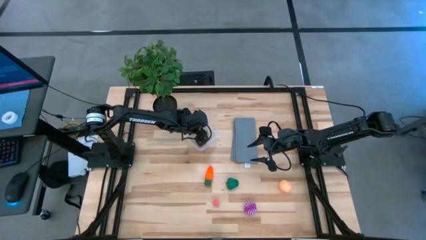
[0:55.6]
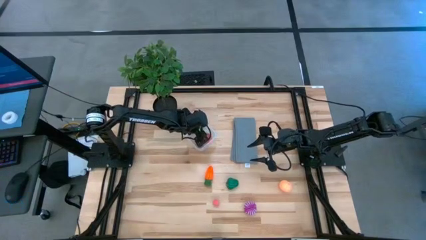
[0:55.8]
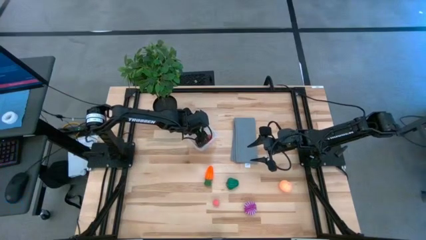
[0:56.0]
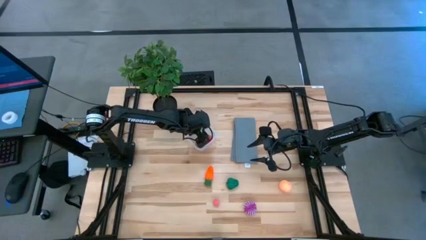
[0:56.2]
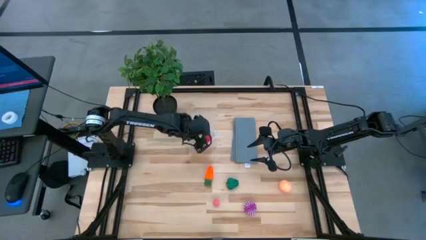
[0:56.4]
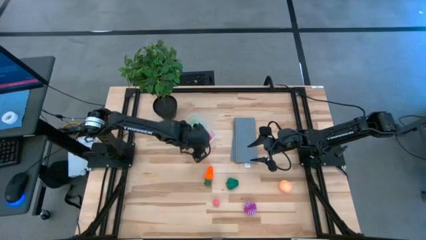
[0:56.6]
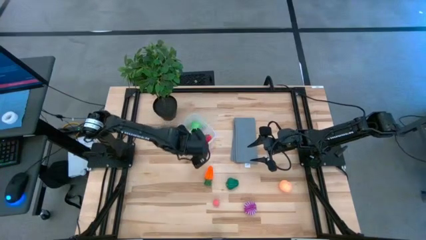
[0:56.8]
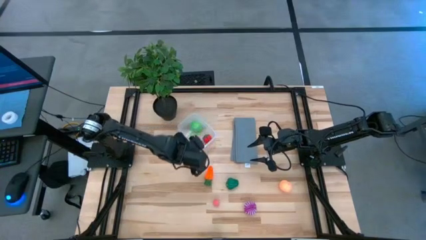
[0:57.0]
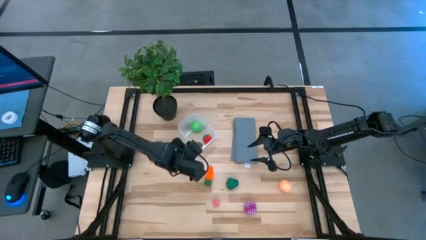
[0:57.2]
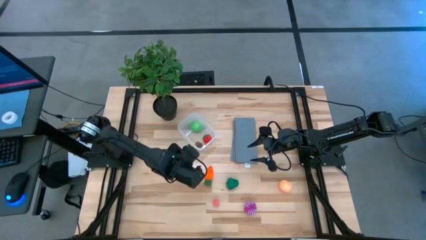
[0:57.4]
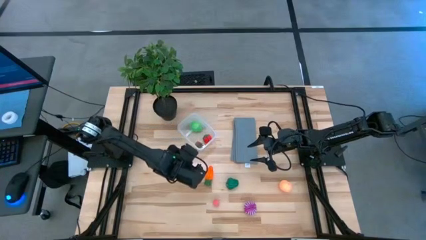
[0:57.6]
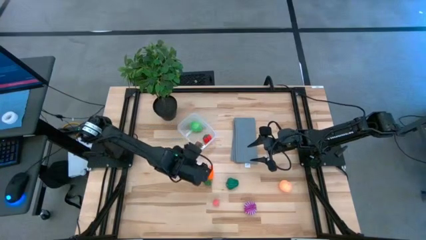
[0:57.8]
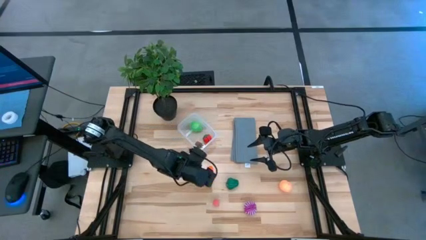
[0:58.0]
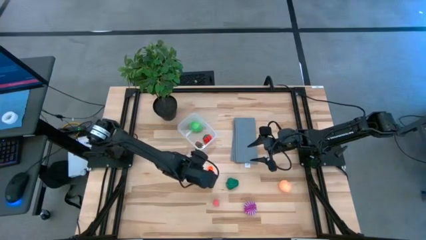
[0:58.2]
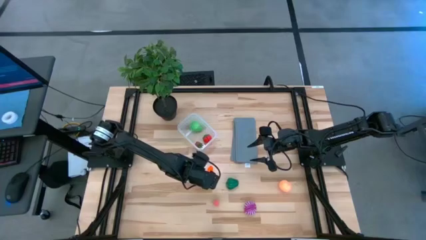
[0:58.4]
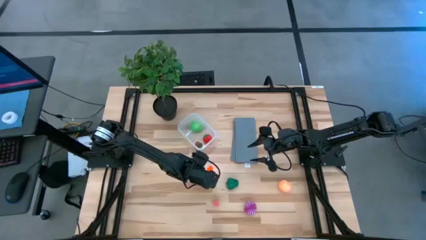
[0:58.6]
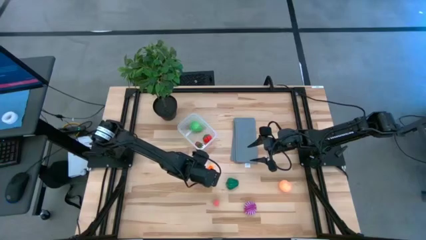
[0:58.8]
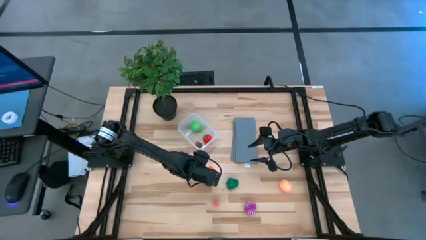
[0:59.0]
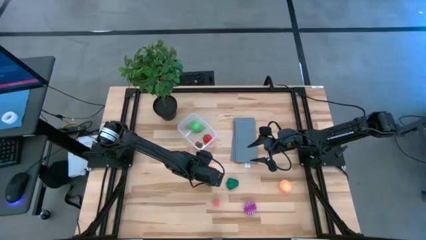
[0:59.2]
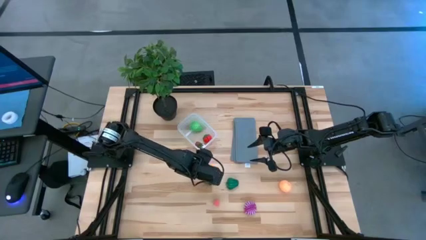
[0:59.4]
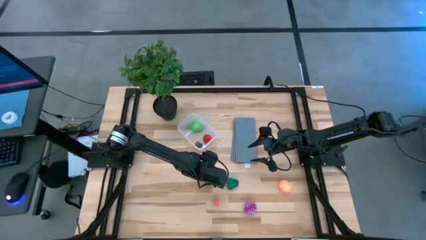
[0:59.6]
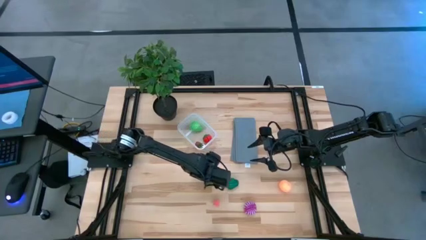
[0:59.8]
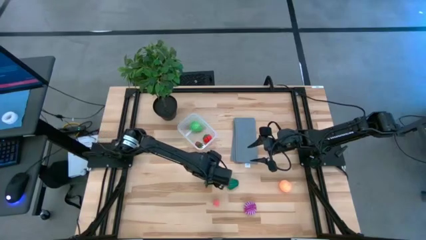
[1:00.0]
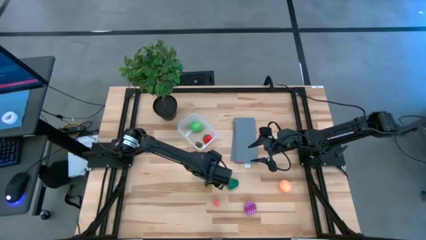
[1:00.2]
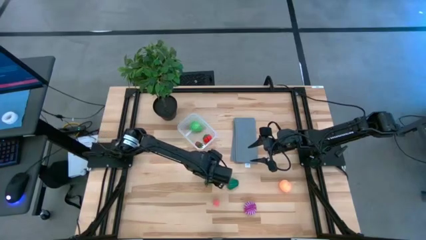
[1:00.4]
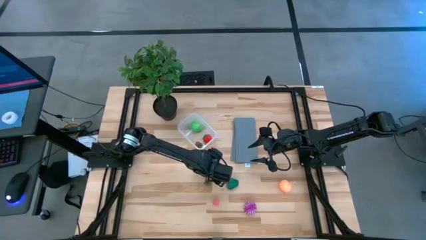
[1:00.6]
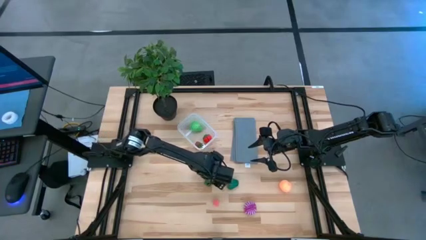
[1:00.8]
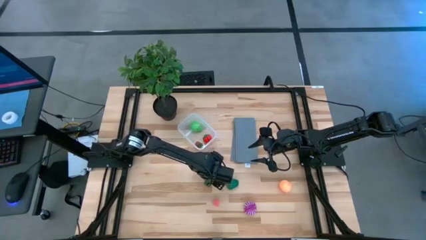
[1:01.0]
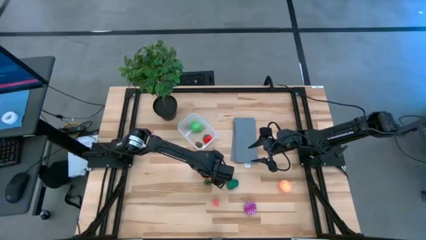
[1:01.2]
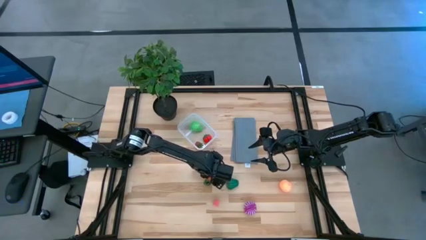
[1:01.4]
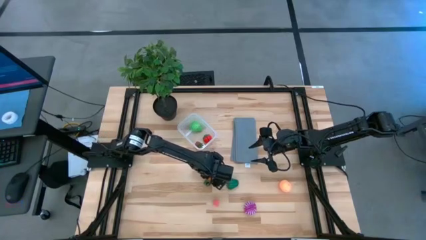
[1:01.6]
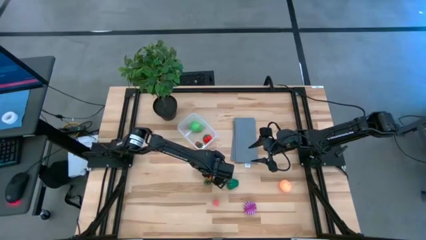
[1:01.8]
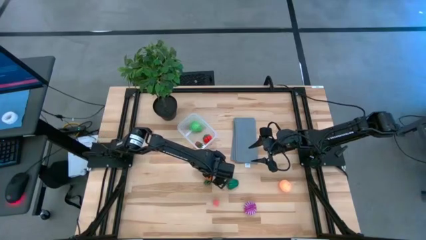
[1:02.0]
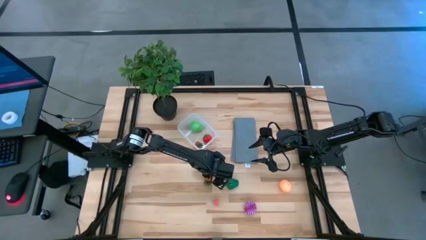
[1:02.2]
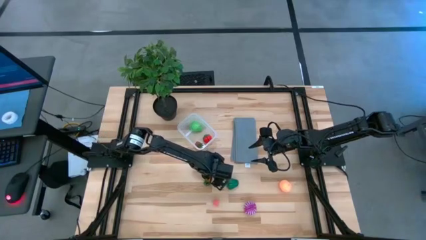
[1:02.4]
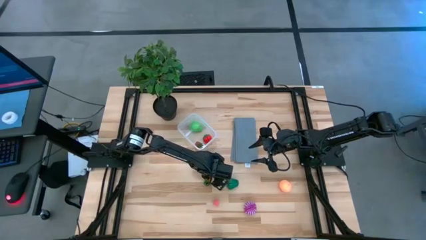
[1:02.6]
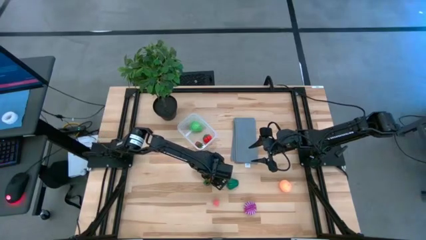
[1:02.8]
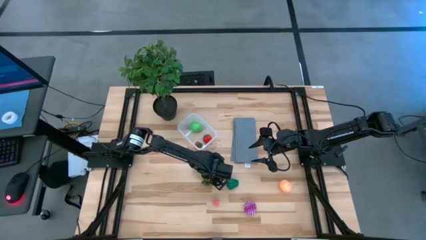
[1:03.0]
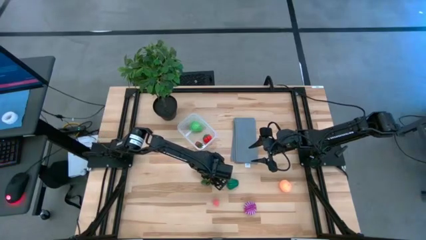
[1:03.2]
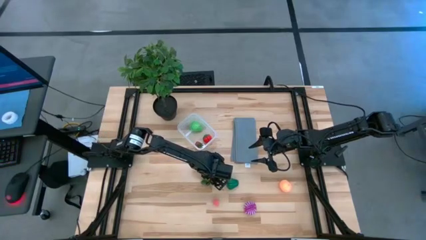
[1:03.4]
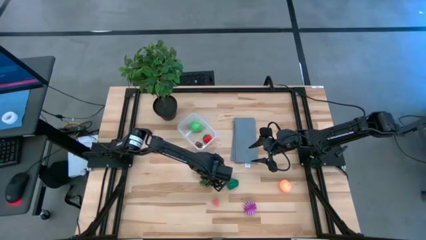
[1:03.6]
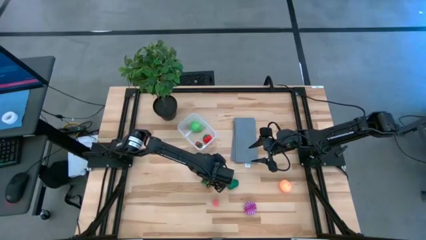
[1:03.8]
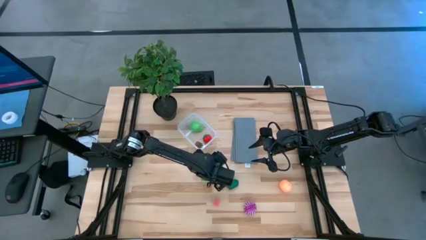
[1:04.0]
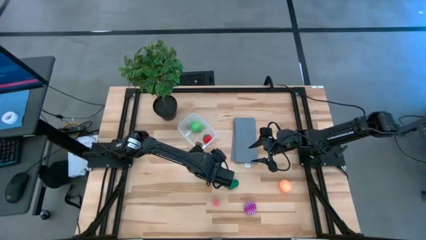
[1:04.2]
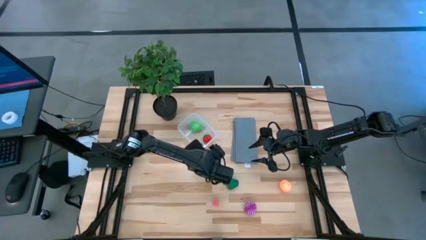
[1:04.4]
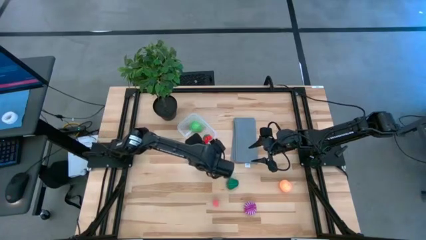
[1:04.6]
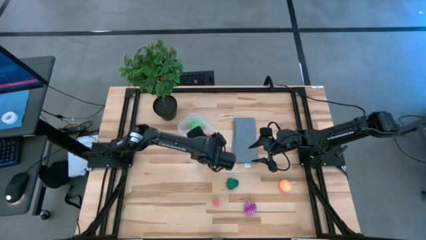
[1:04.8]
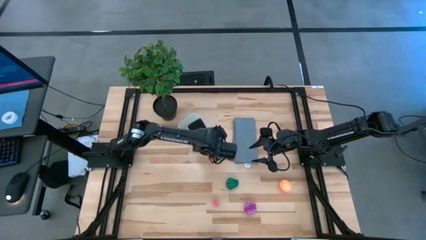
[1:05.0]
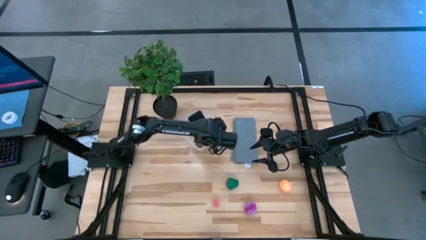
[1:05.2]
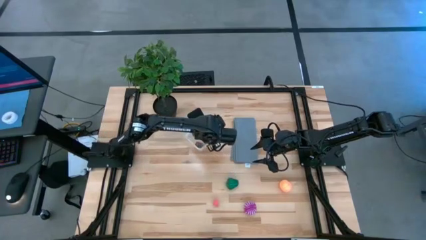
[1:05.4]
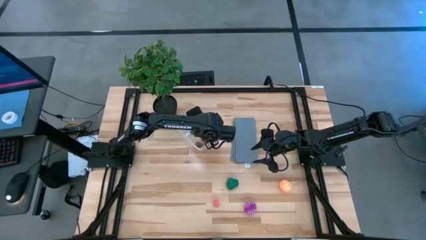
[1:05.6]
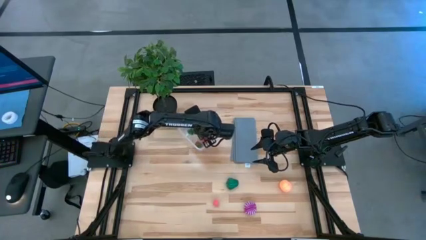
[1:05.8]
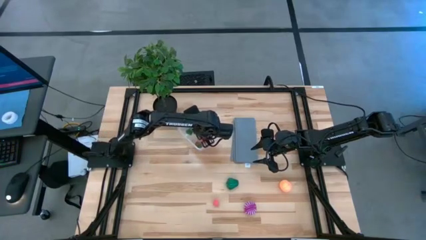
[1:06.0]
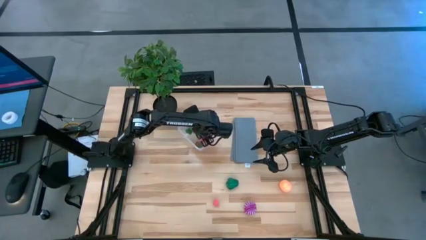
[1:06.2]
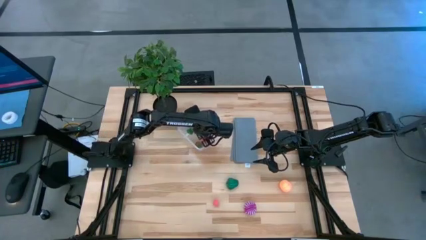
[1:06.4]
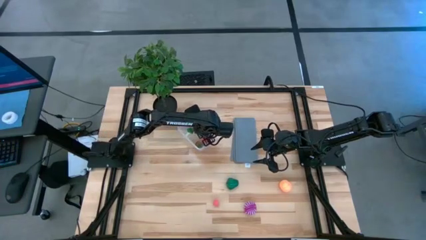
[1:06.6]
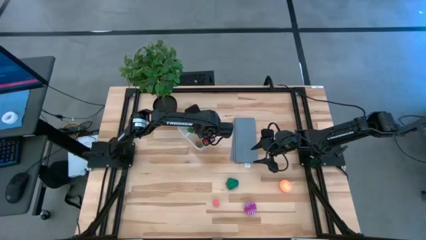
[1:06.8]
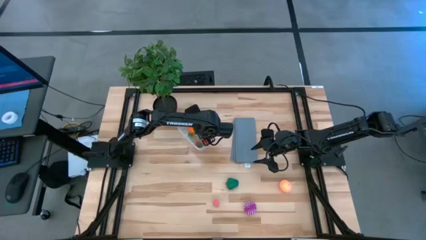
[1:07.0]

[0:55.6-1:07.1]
Task: Pick and placing Produce into tupperware
Put the orange carrot into the transparent bin

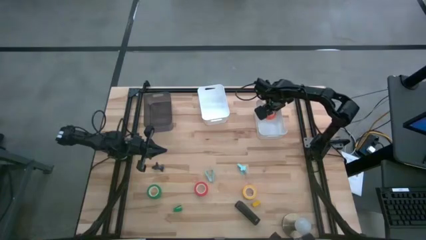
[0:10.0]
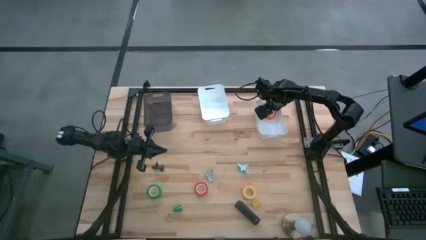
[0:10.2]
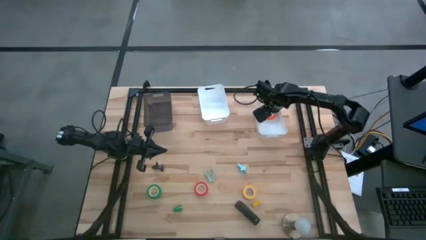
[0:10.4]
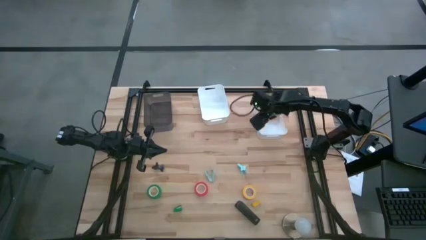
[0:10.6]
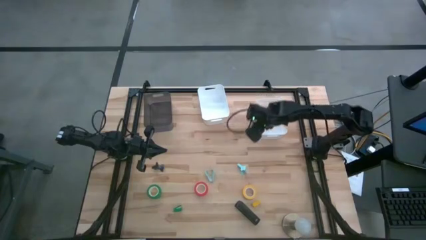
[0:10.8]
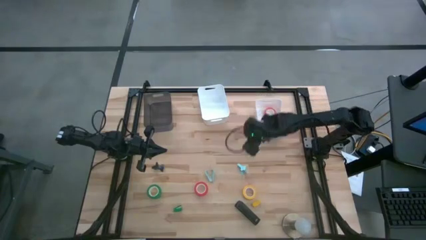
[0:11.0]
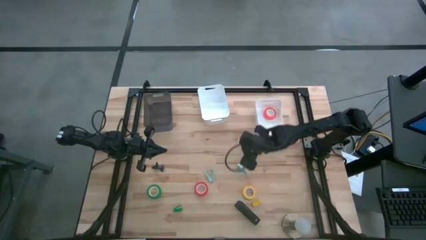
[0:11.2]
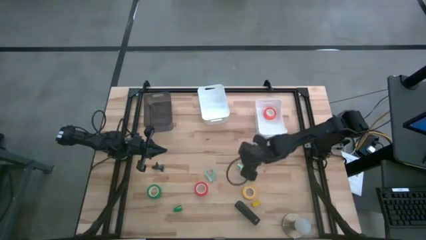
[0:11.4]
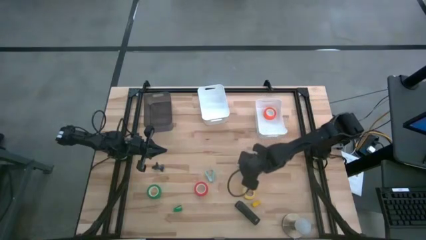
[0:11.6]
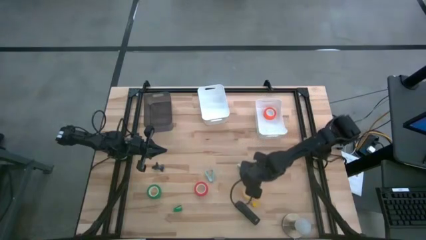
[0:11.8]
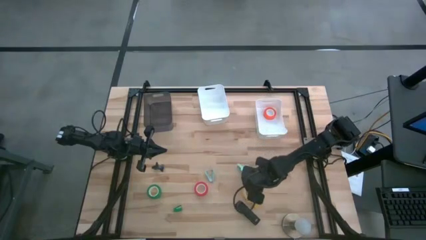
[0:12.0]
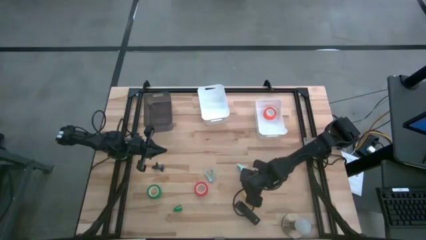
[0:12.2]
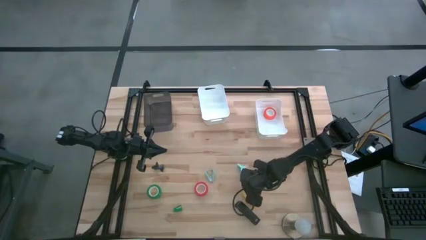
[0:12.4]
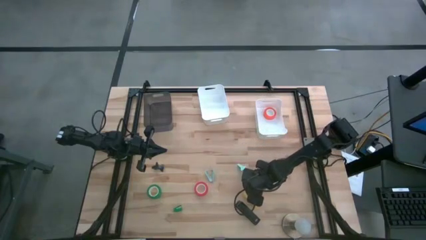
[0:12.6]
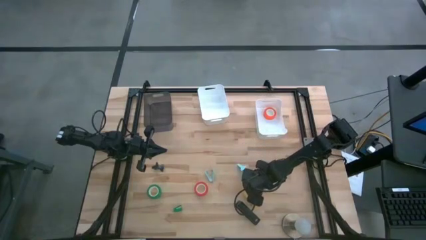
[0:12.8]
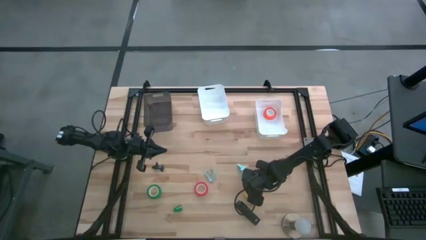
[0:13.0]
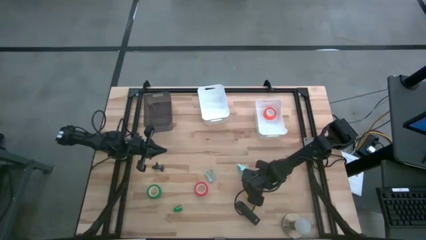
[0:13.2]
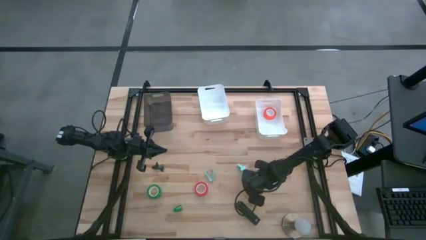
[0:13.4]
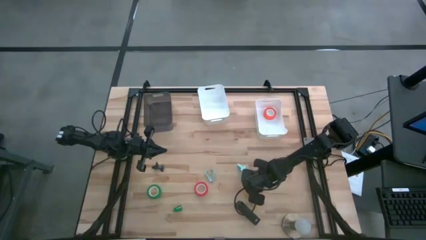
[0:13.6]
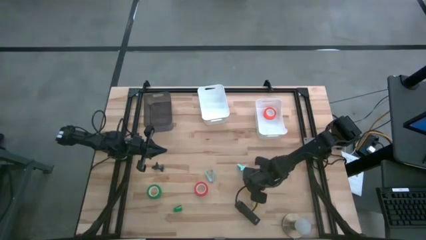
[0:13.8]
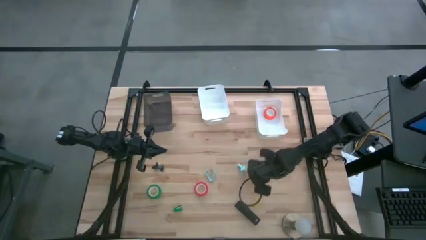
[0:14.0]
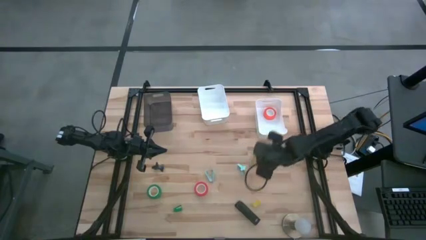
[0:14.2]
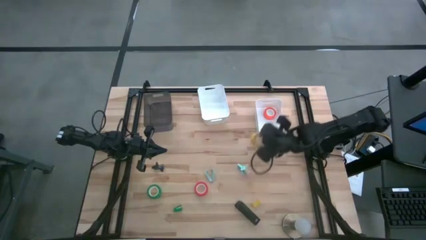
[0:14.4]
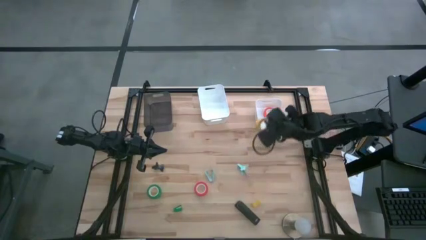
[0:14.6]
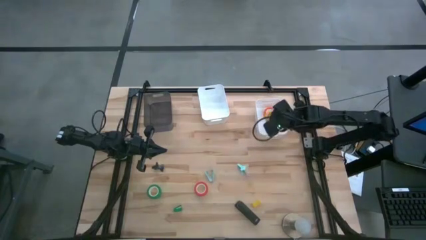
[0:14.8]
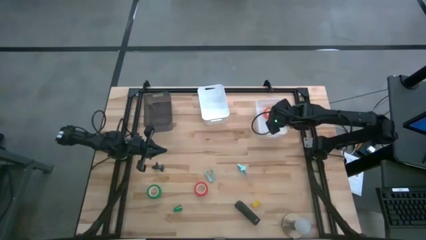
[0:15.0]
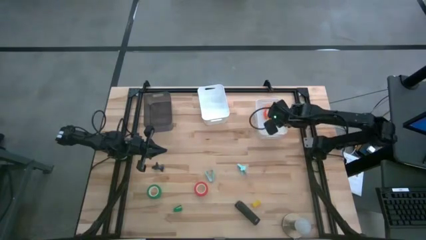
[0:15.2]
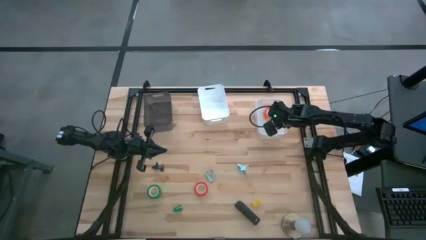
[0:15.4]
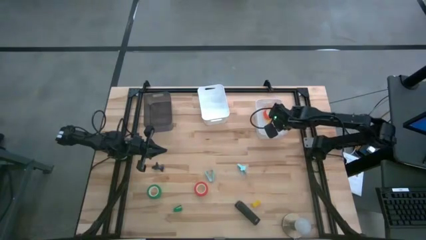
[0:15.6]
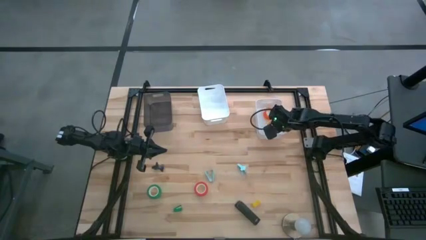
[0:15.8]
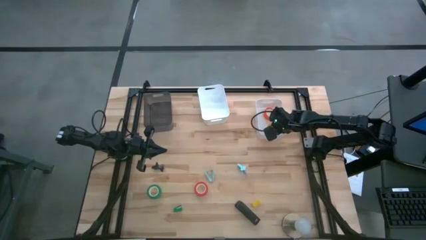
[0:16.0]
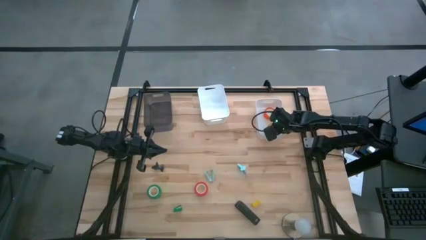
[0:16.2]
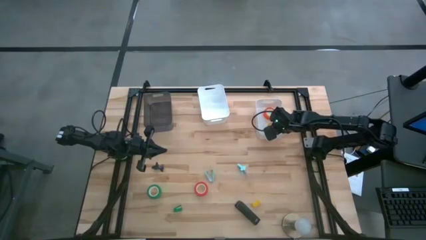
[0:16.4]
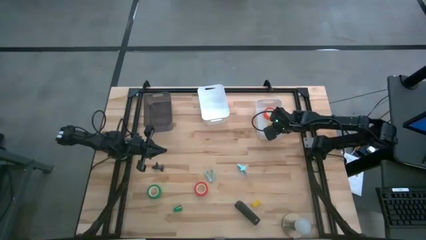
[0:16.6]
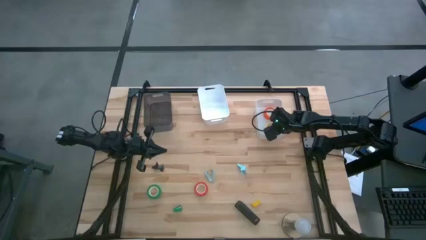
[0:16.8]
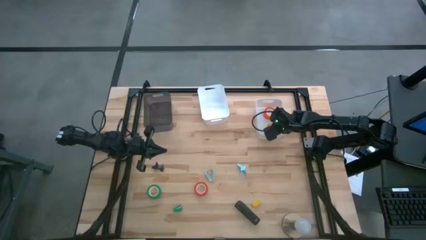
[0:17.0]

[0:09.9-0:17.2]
Task: Pick and place Stapler, Stapler remover, tape
Put the yellow tape into the right white bin
